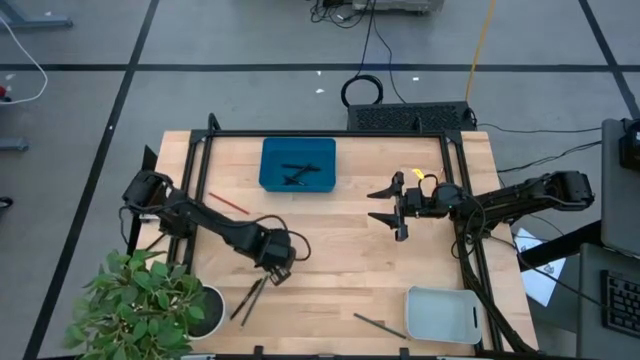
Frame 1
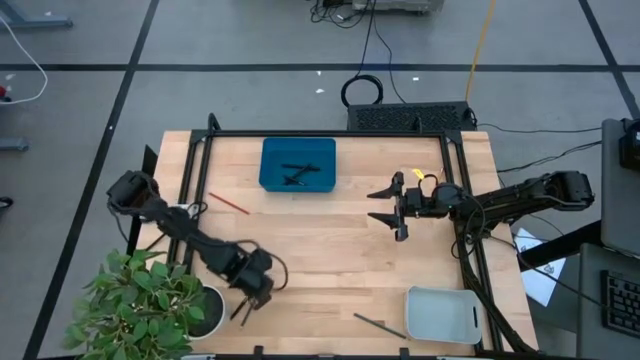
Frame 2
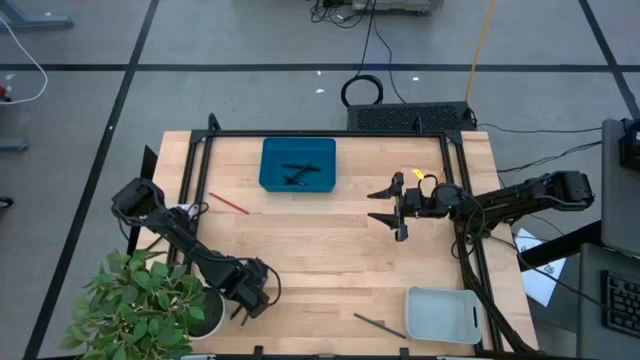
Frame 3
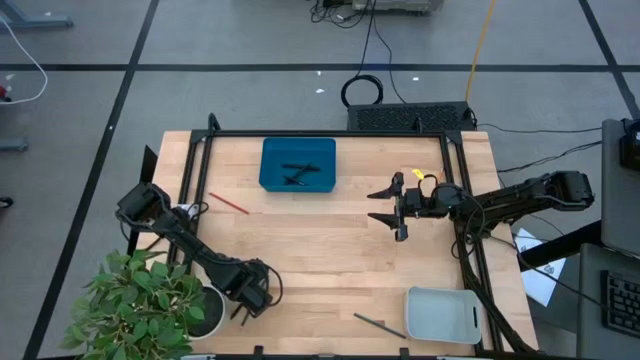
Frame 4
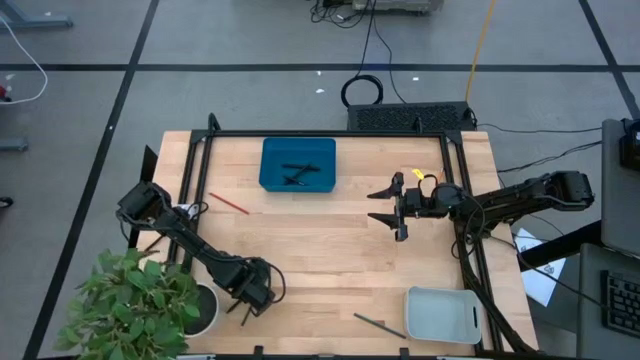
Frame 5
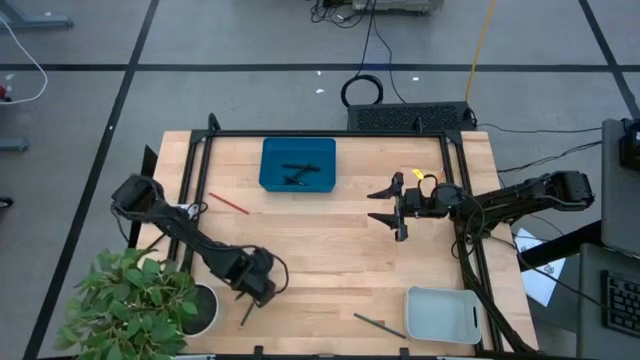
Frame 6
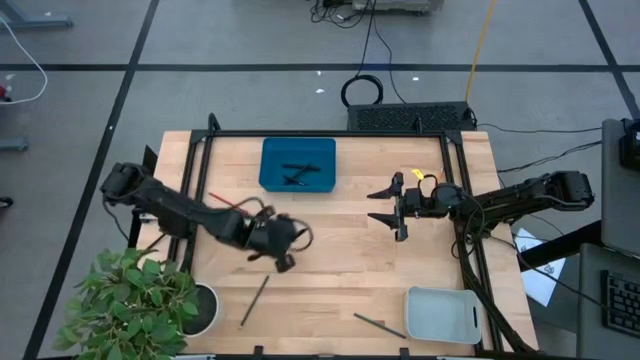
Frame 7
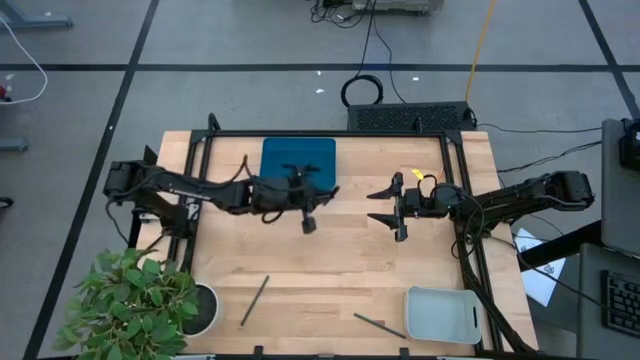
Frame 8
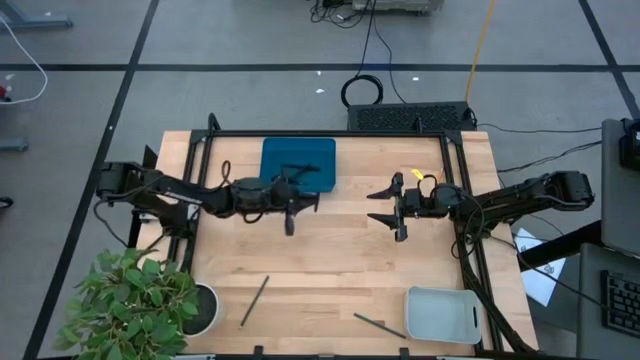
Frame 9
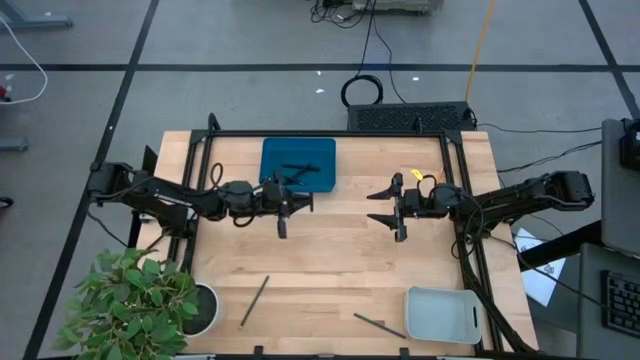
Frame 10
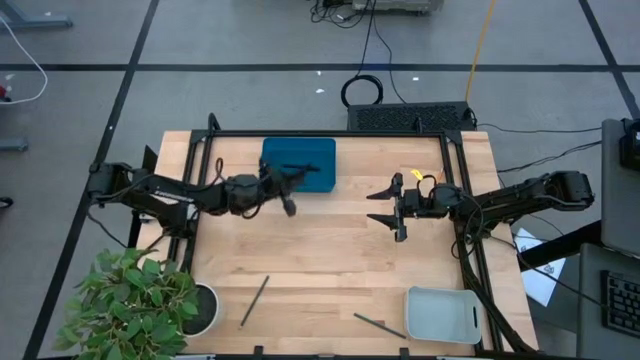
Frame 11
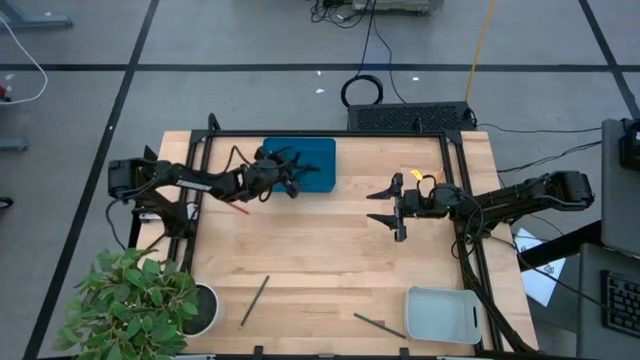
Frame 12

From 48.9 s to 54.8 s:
Task: Sort pens & pencils
Put the black pen into the blue bin

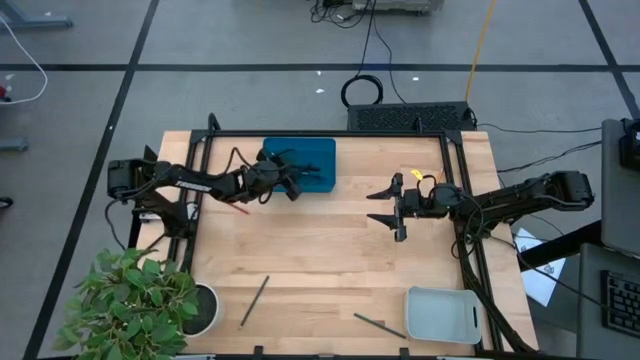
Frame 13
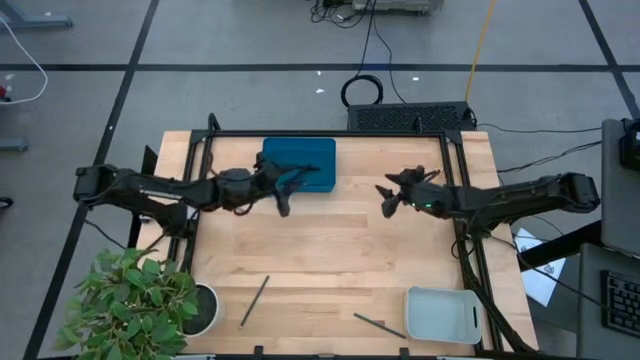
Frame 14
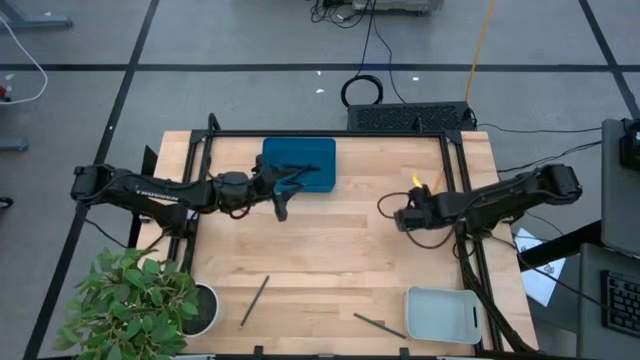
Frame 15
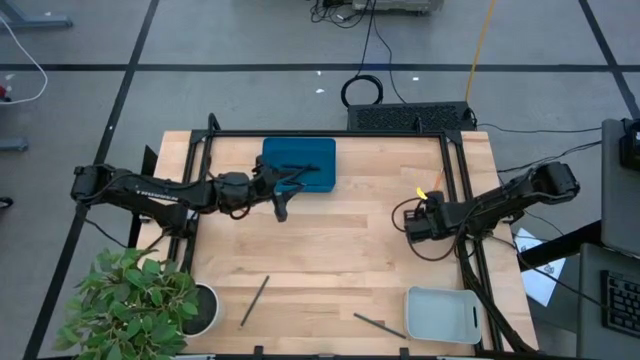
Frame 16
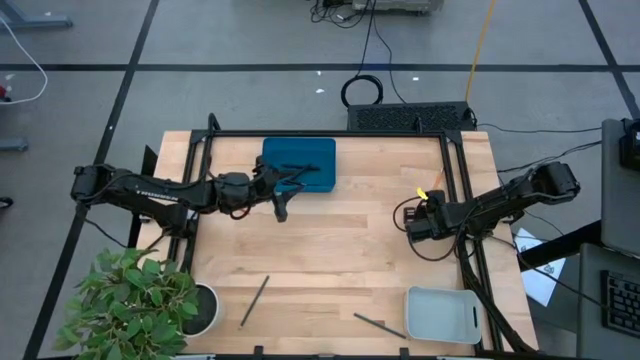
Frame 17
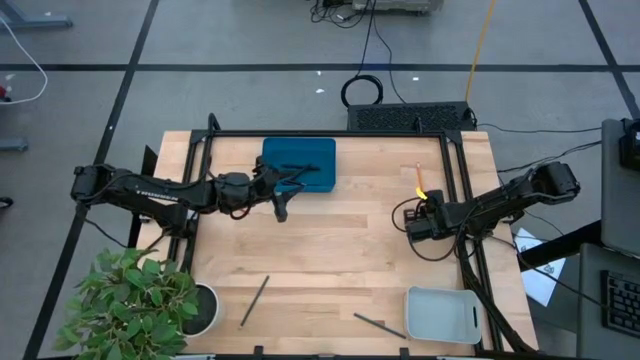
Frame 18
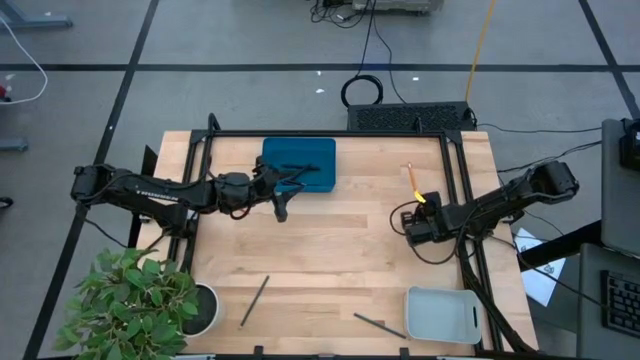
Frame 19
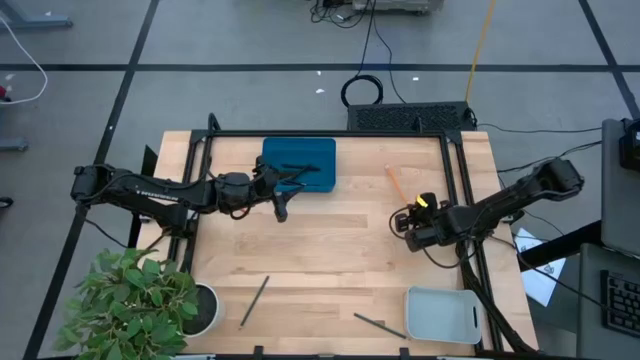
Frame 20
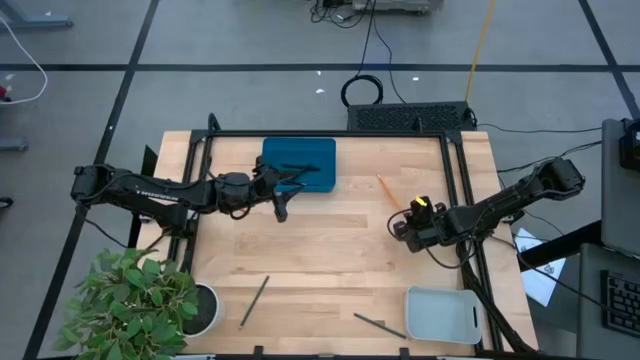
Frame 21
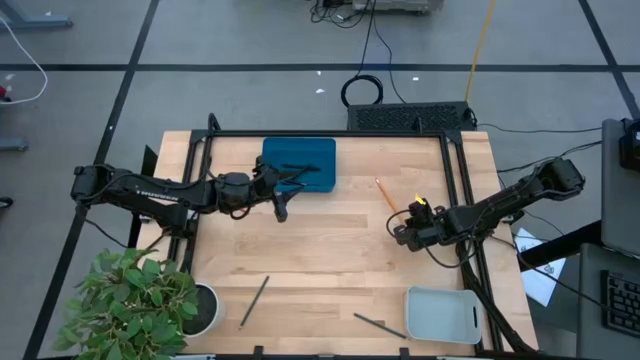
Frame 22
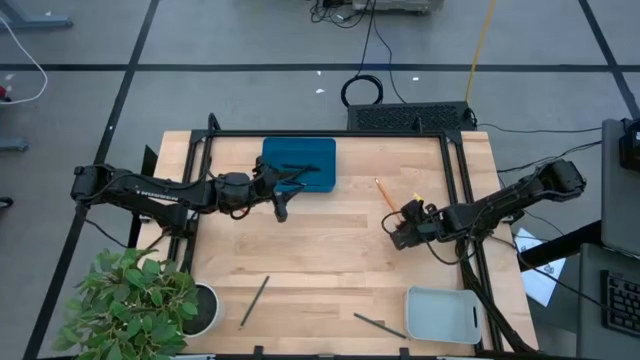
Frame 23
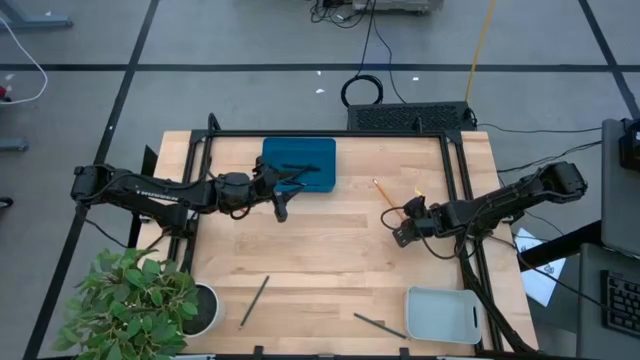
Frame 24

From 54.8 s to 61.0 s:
Put the yellow pencil into the gray bin

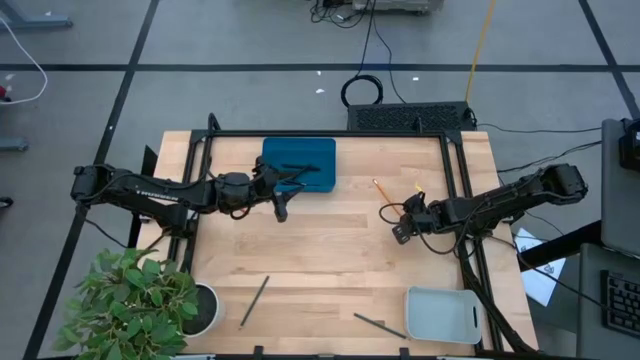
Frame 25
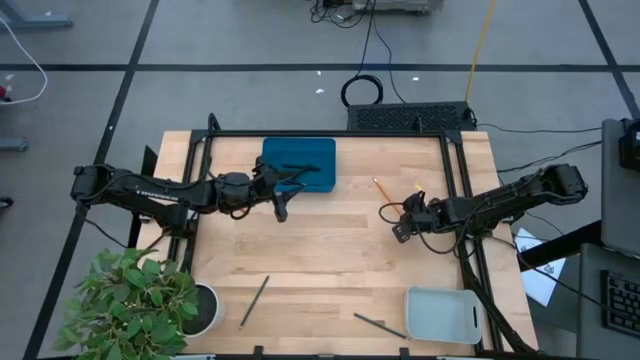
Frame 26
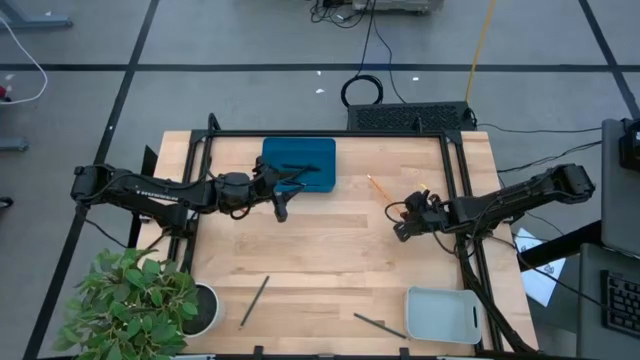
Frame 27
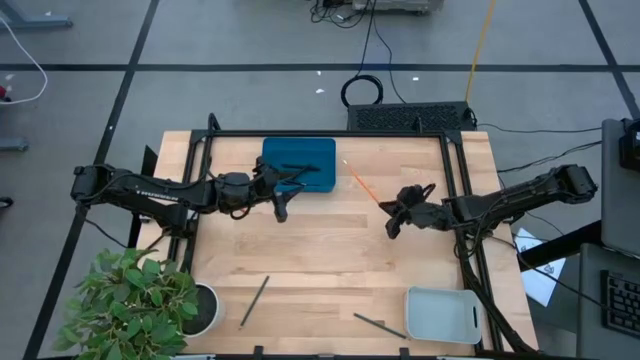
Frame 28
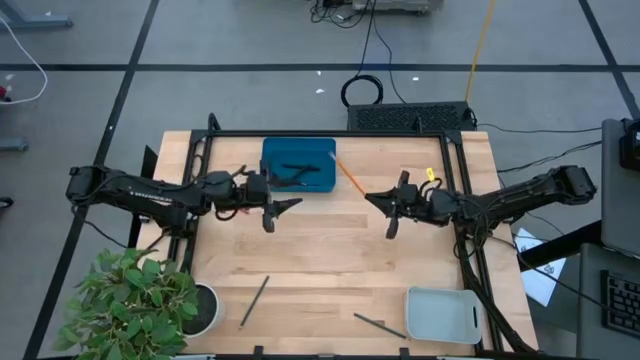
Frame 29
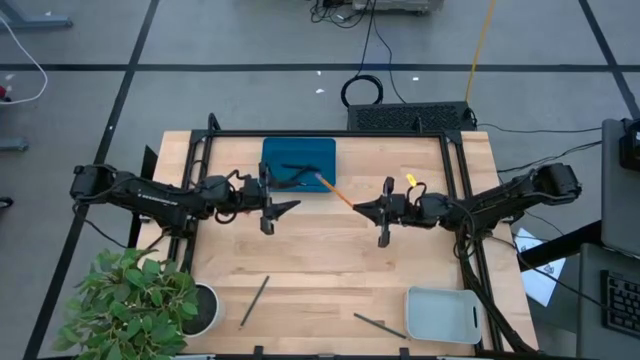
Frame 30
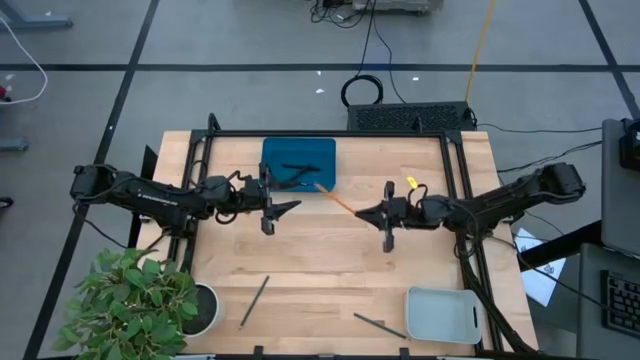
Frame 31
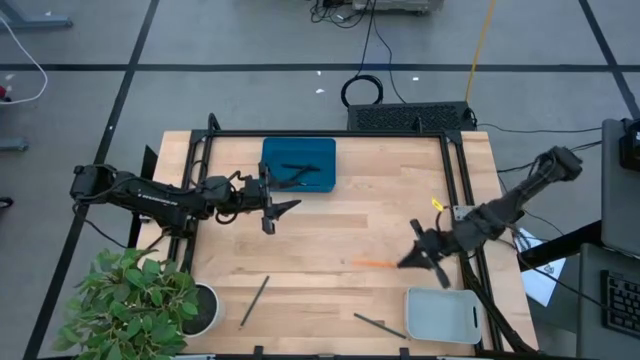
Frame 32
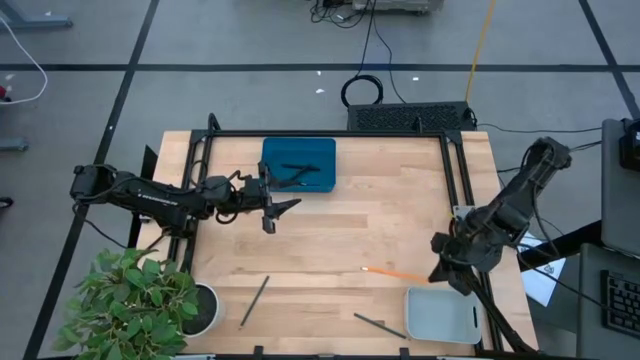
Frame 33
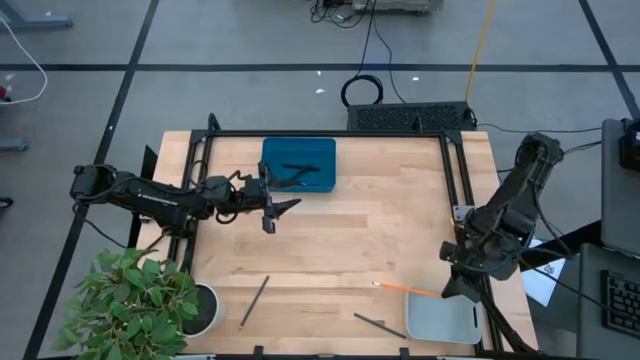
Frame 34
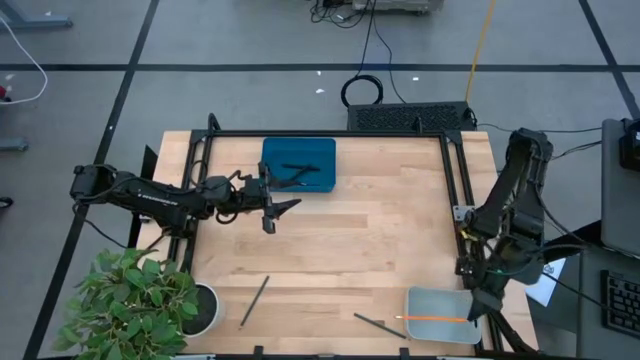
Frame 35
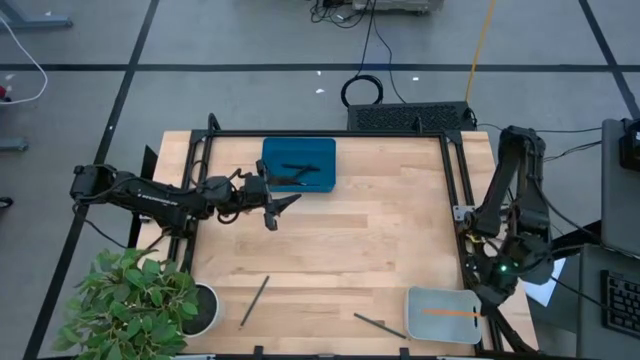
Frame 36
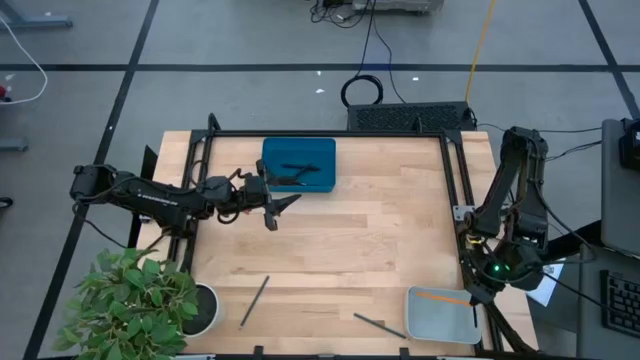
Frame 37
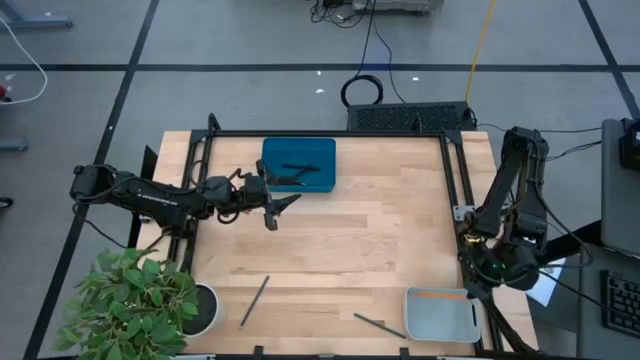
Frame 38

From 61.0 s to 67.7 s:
Put the yellow pencil into the gray bin

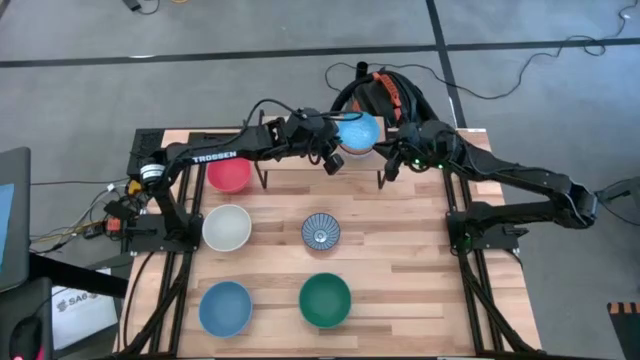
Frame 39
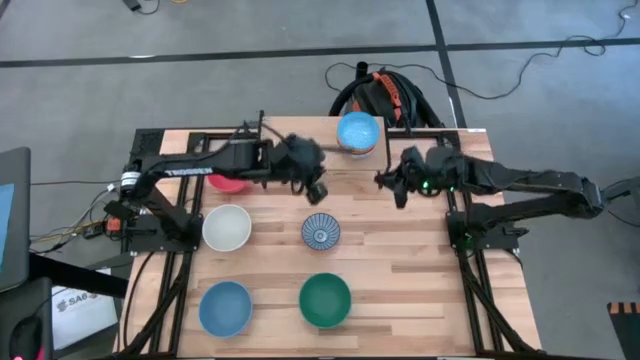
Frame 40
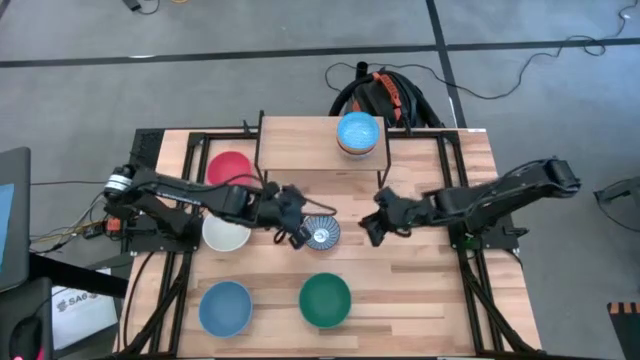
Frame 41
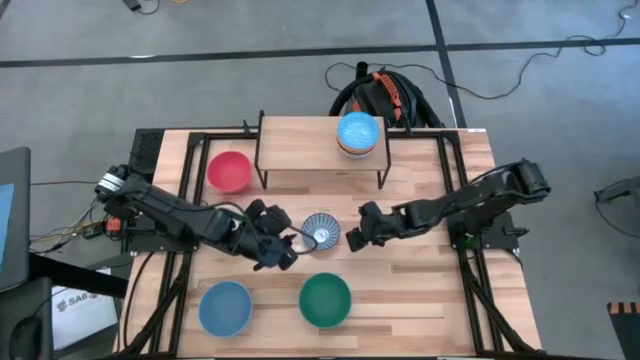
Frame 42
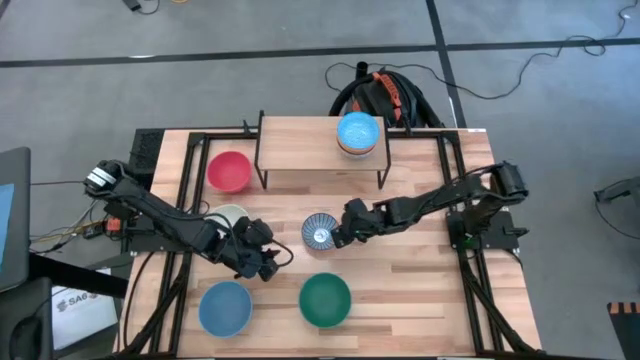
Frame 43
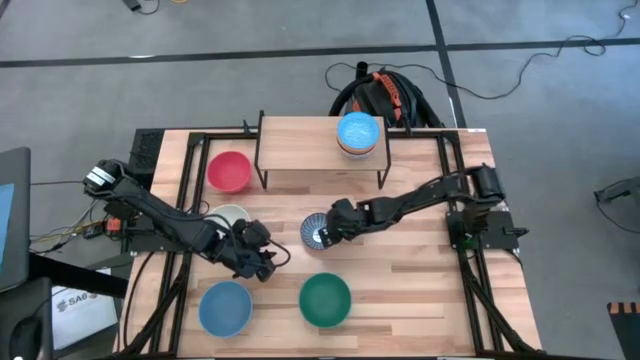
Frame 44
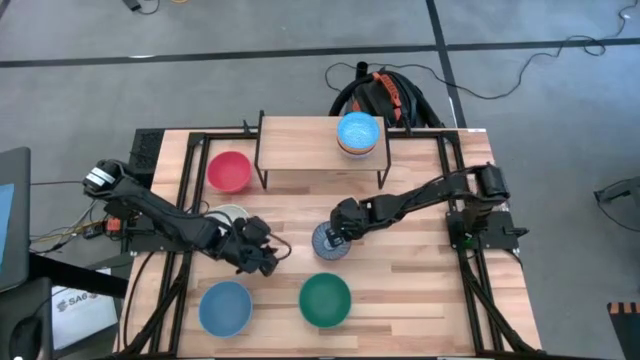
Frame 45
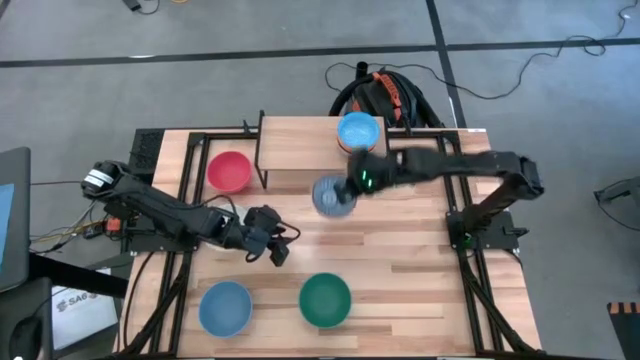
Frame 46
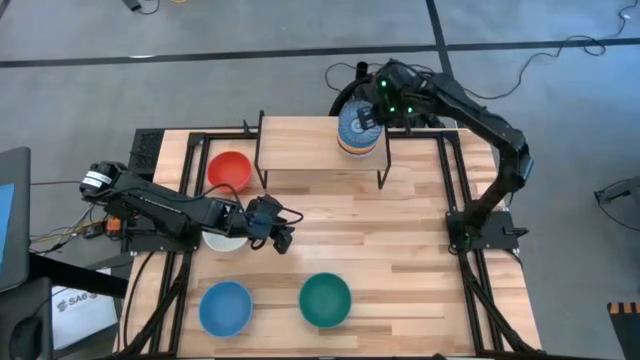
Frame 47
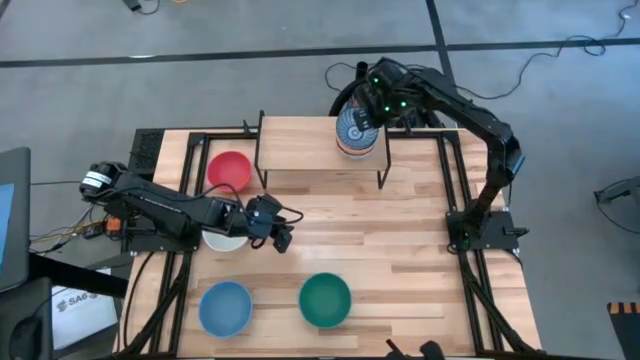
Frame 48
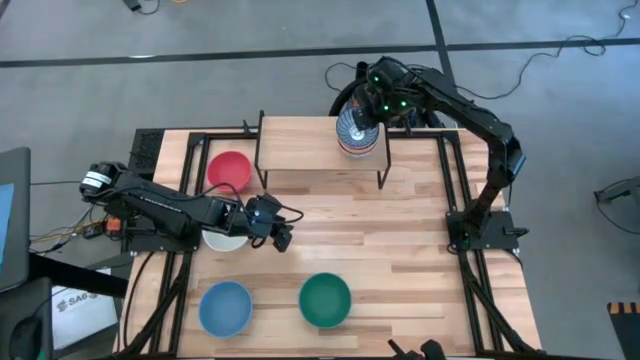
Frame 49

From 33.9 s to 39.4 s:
Task: Place and stack bowls onto a shelf
Stack the dark blue patterned bowl on top of the blue patterned bowl
